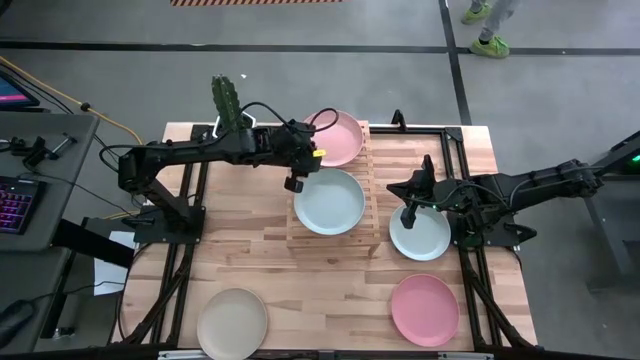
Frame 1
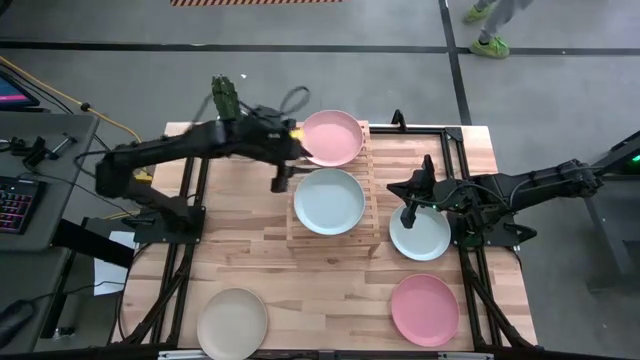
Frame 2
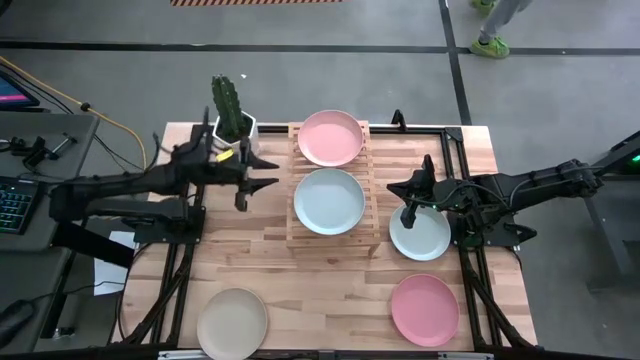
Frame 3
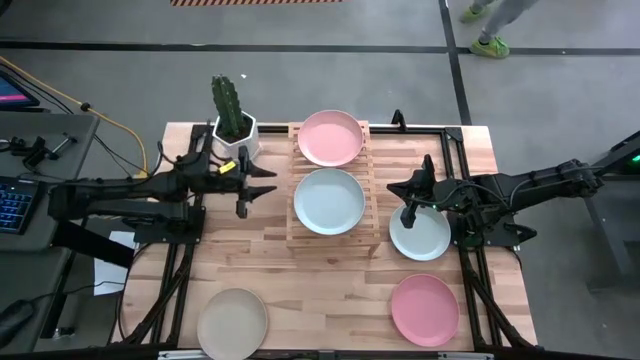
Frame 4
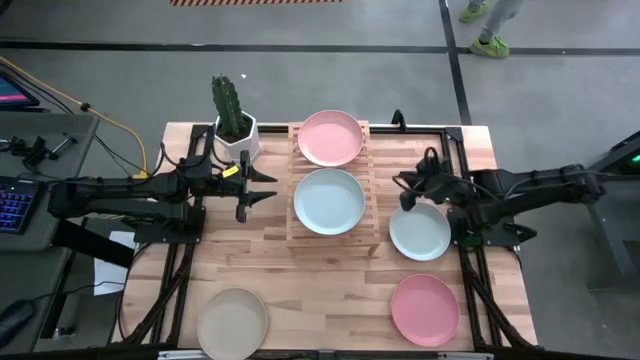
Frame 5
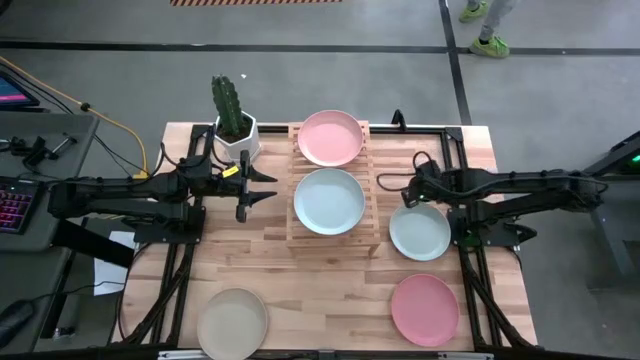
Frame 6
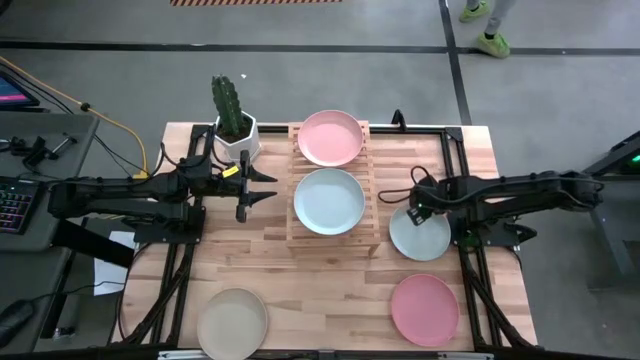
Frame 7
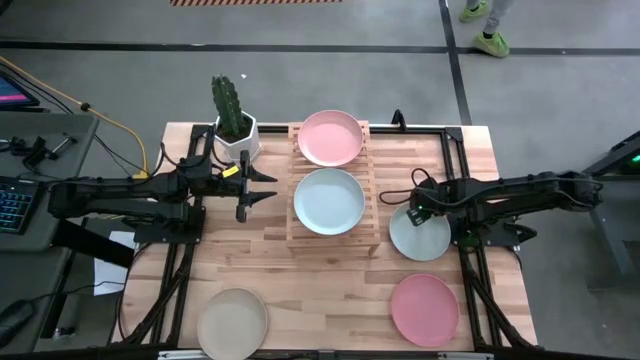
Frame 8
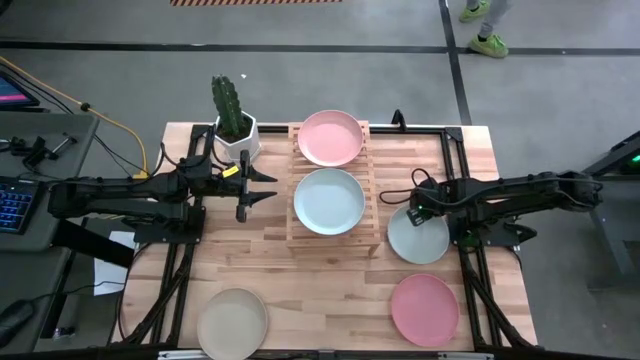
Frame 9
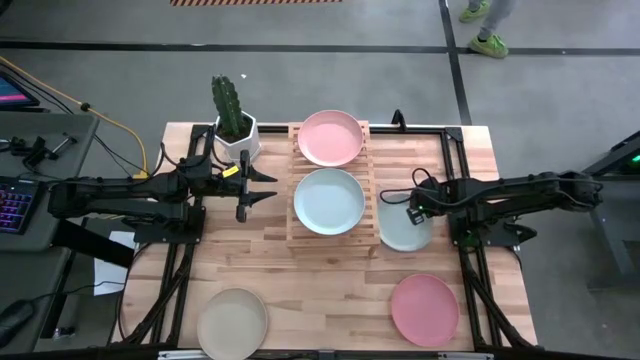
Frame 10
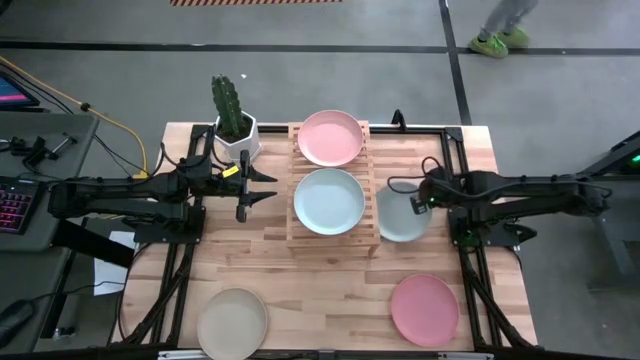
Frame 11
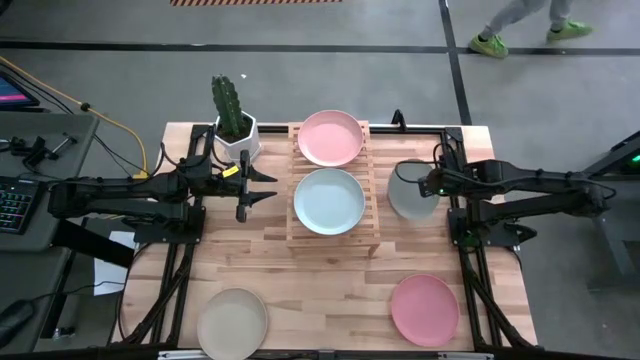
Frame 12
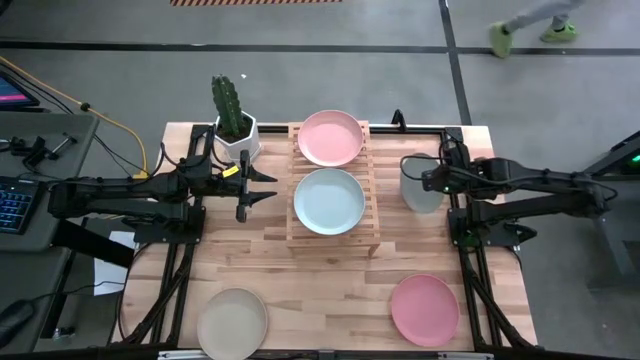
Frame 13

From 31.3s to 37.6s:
Task: Place and stack plates onto a shelf
Stack the blue plate on top of the blue plate on the shelf

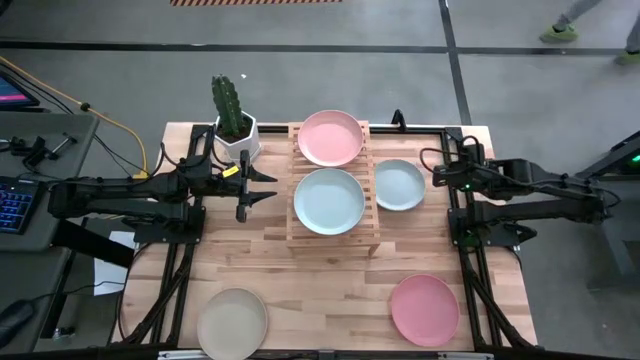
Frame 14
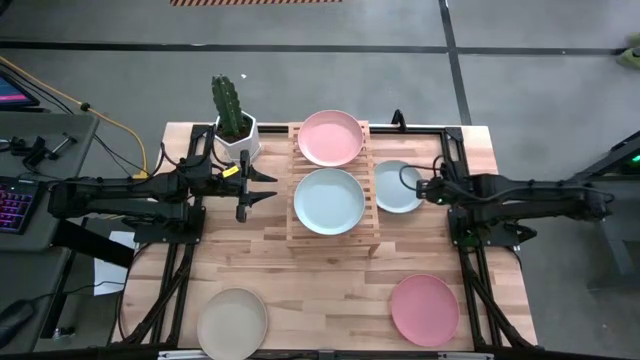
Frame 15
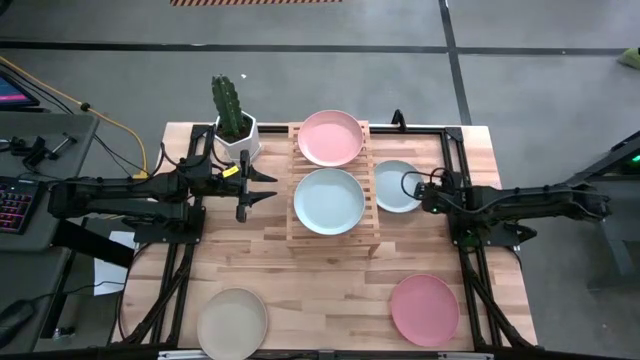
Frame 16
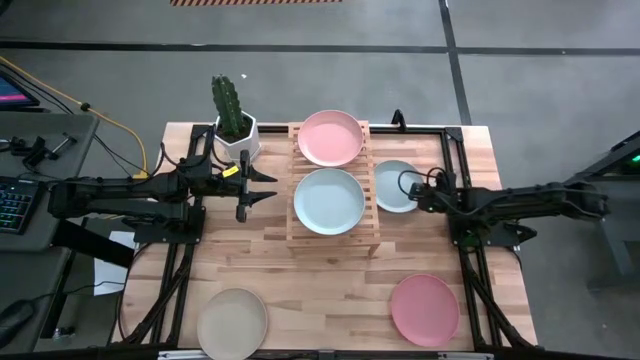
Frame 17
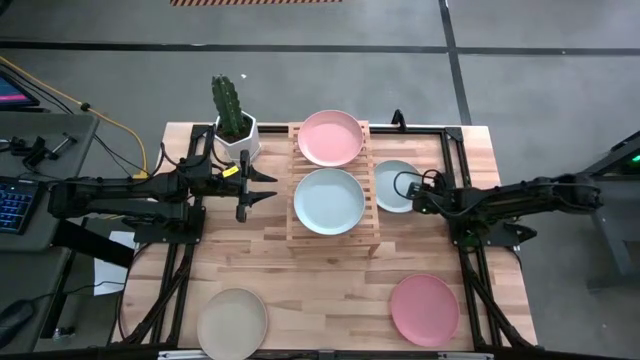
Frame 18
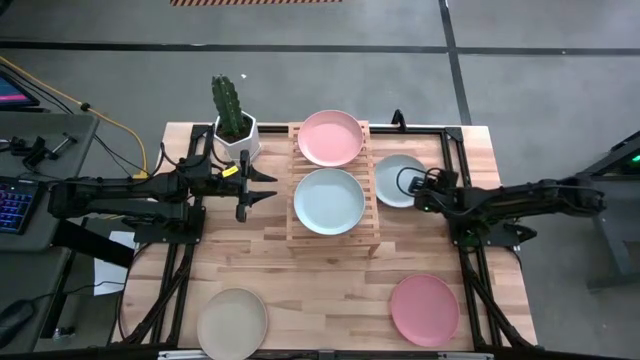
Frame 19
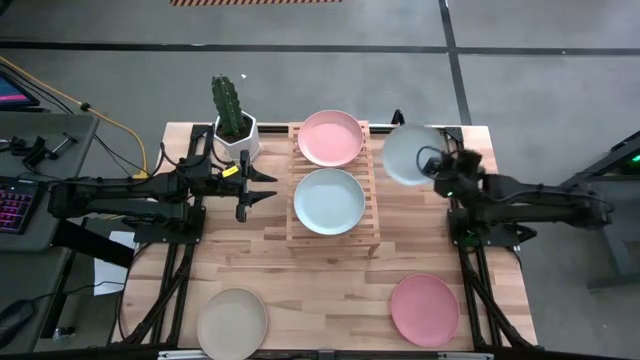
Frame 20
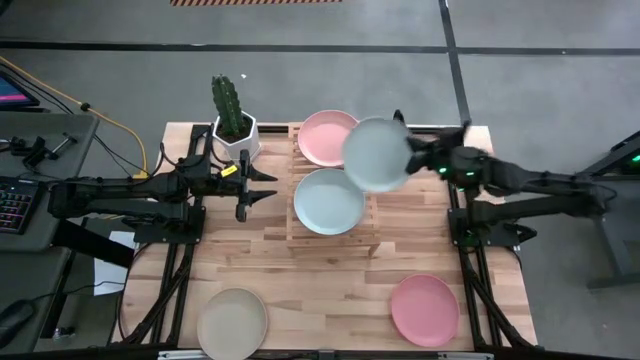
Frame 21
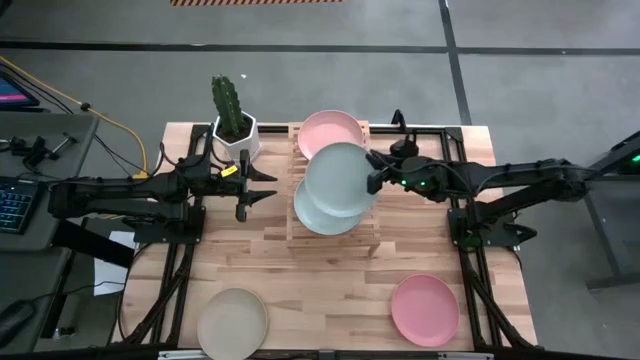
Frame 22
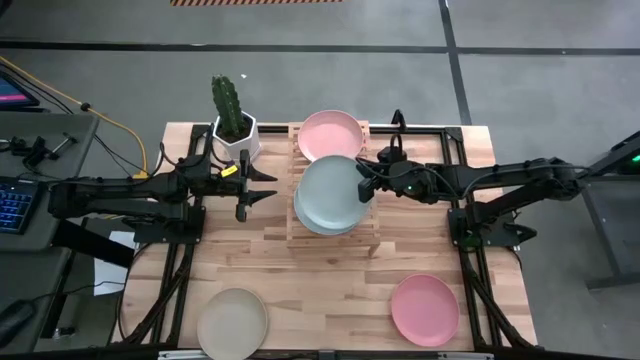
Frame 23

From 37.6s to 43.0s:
Stack the blue plate on top of the blue plate on the shelf

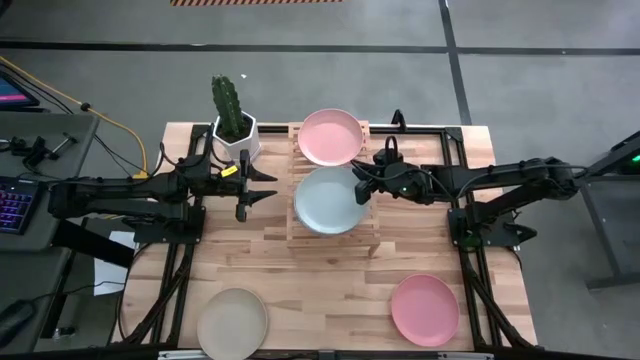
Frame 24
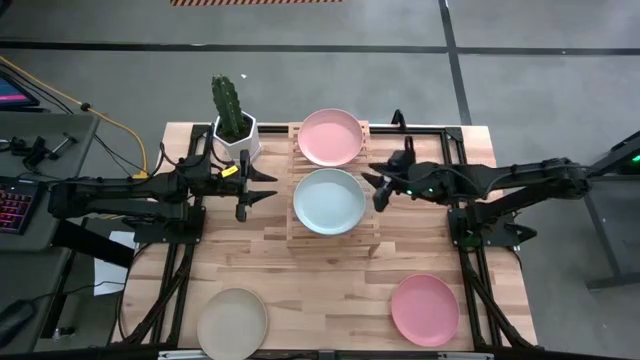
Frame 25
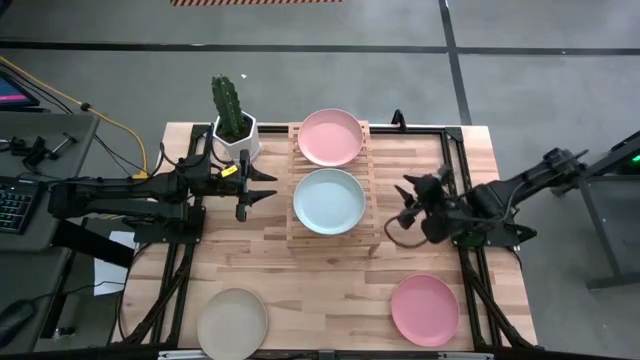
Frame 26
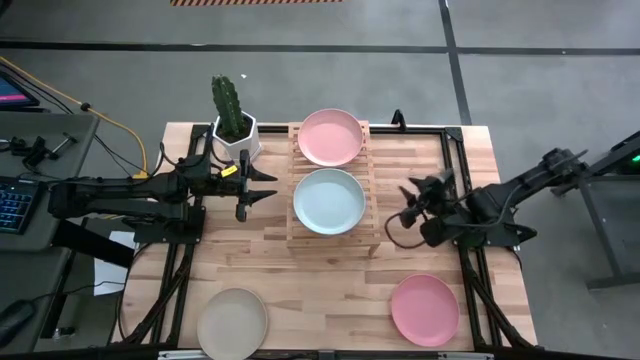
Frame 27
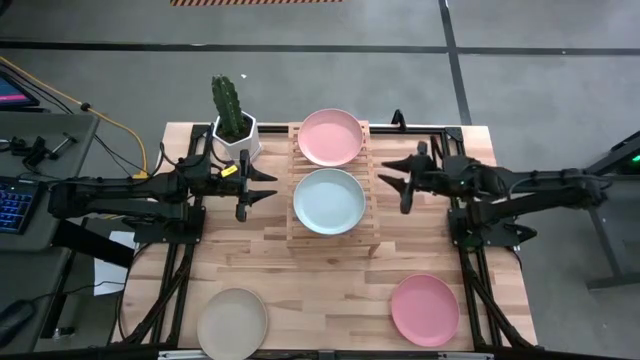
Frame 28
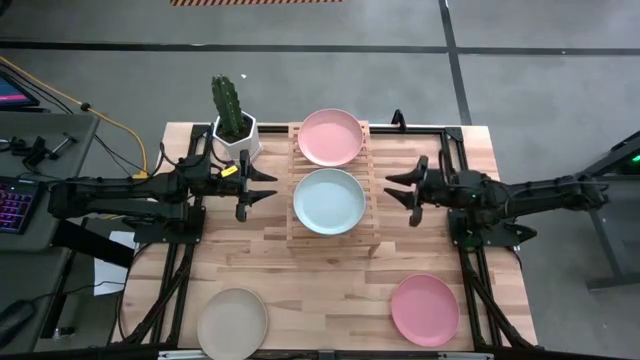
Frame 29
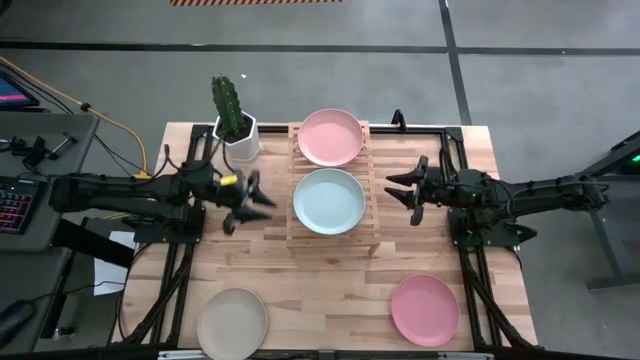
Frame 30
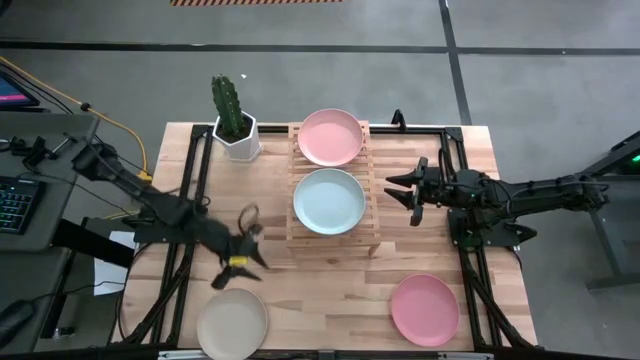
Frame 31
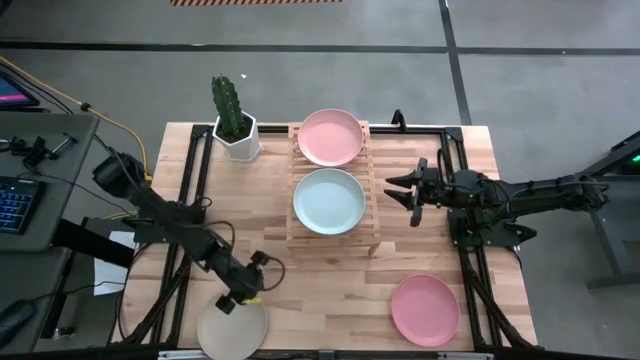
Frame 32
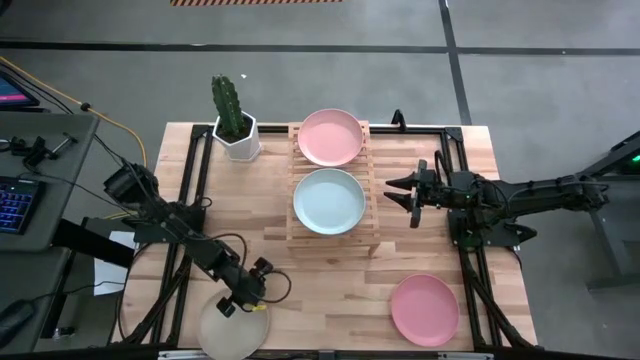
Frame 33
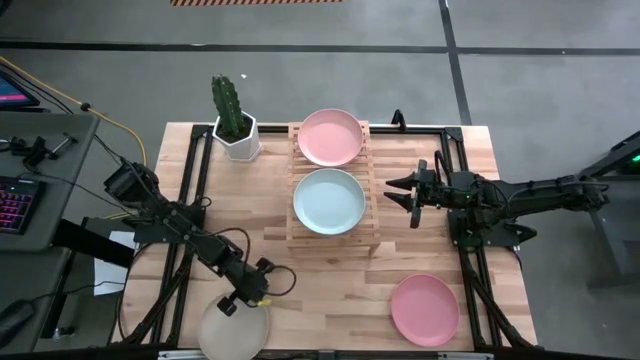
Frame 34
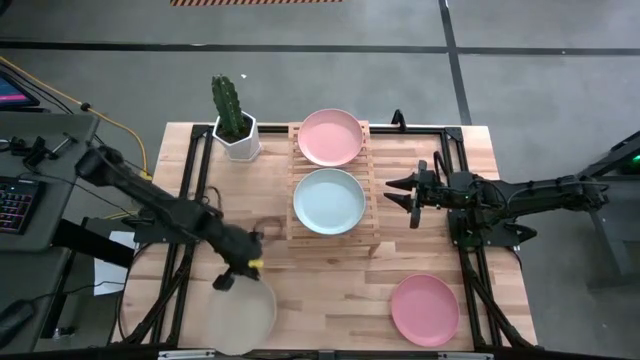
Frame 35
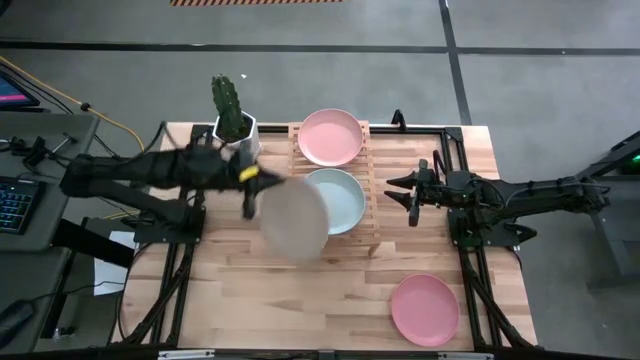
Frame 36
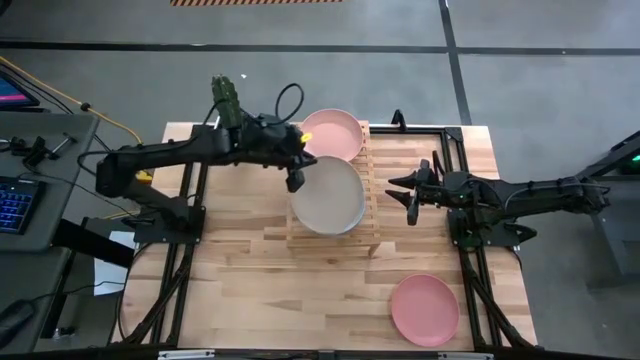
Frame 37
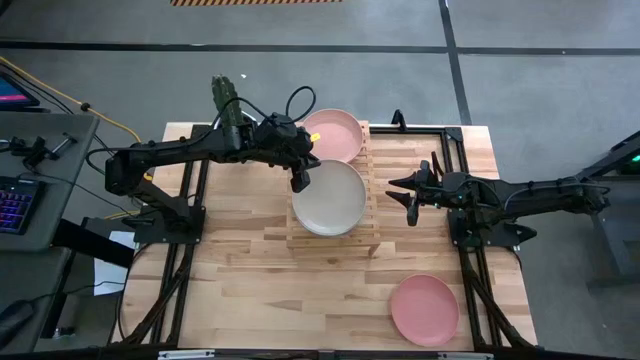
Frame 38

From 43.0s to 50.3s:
Stack the gray plate on top of the blue plate on the shelf
